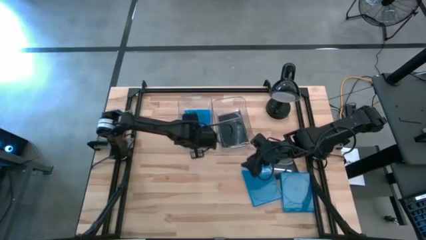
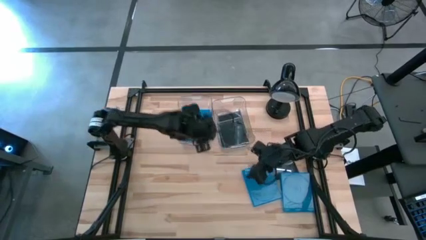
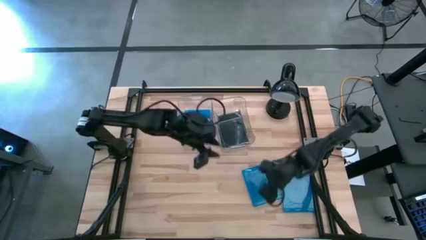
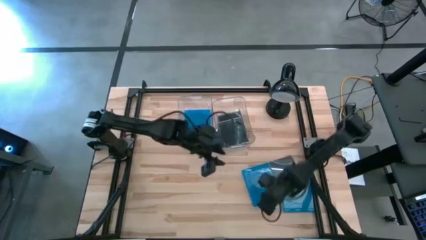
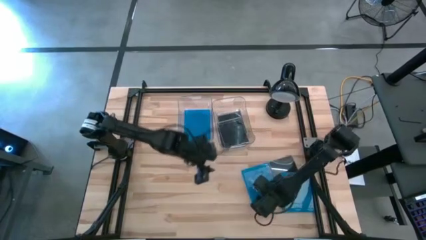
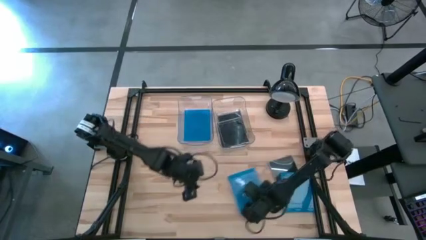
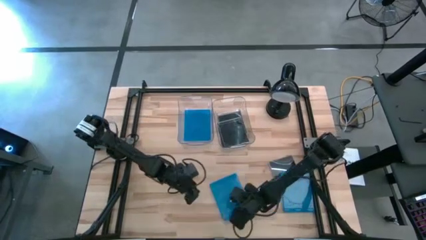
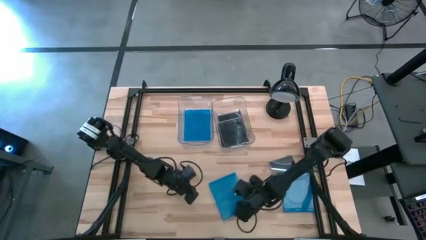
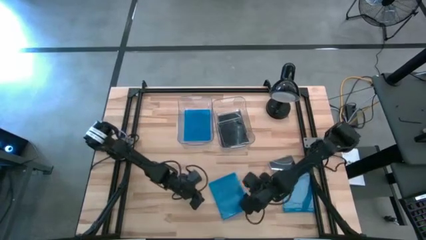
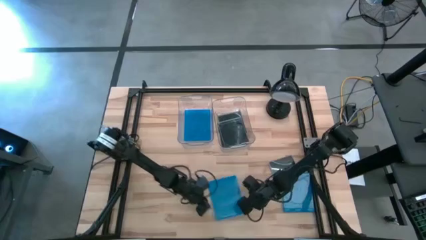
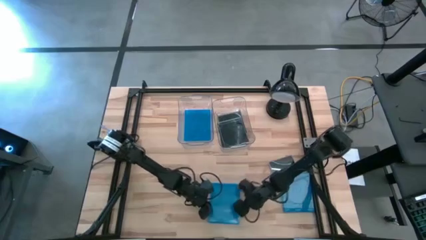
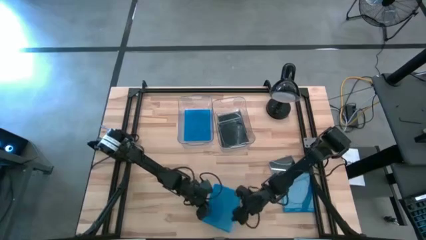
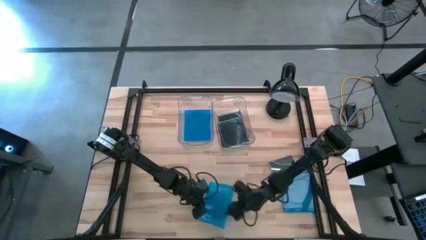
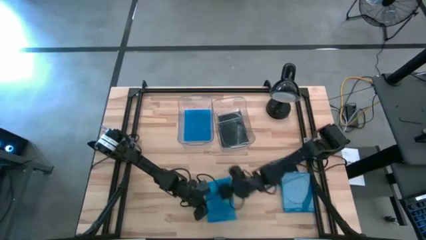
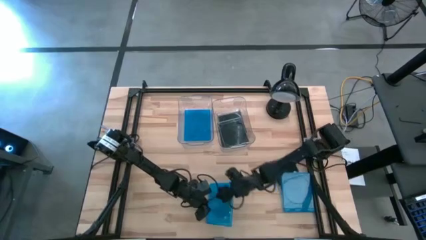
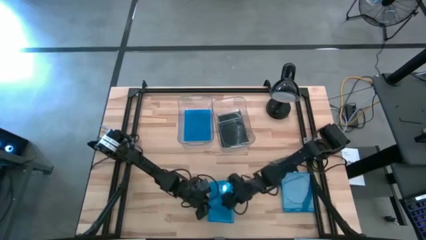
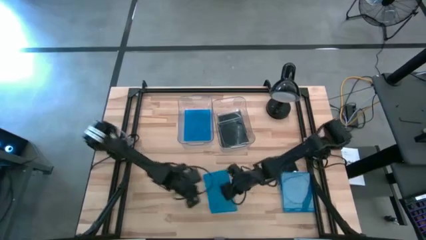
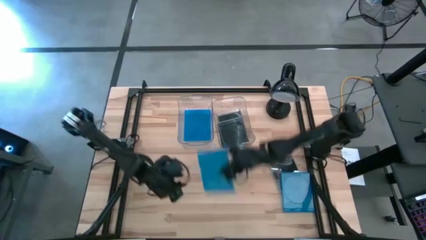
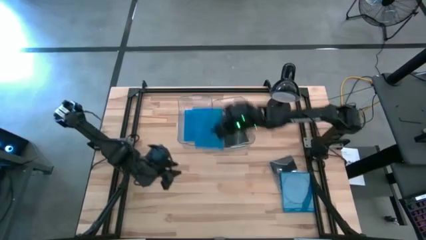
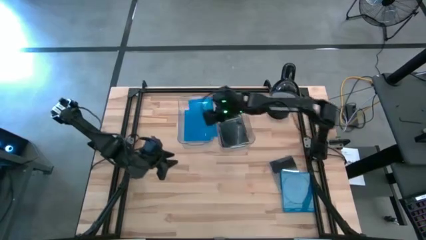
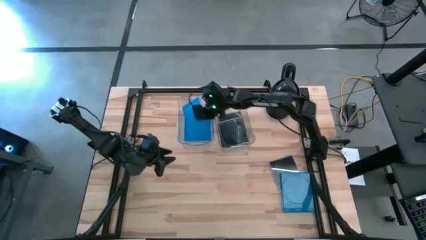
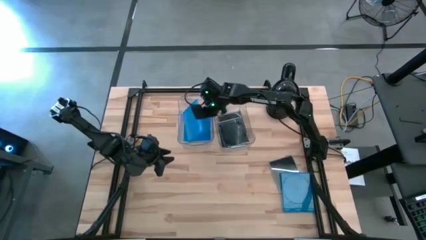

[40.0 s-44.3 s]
Task: Pick & place jewel cases by type
Put the blue CD case into the left transparent bin

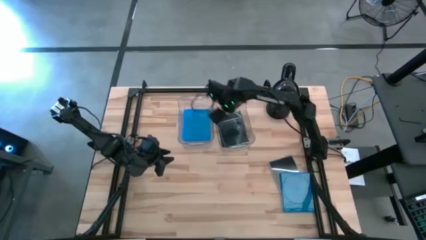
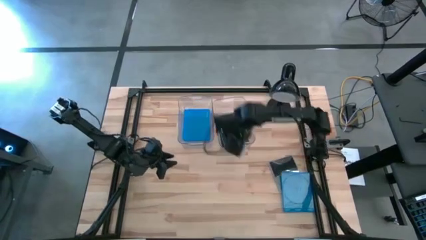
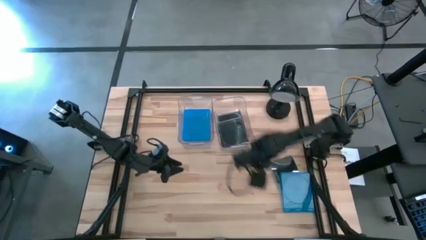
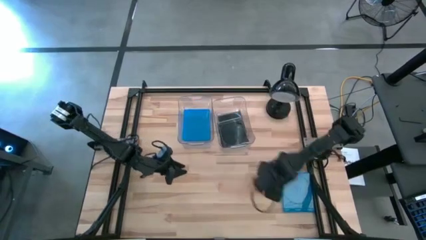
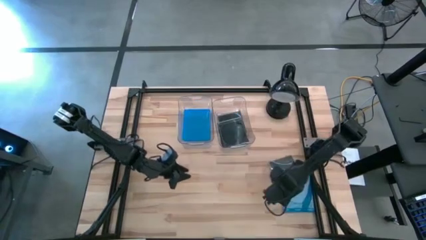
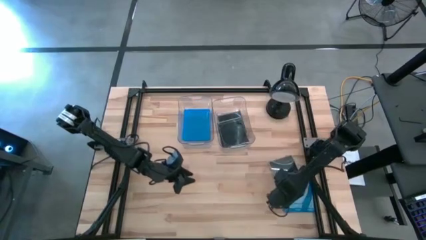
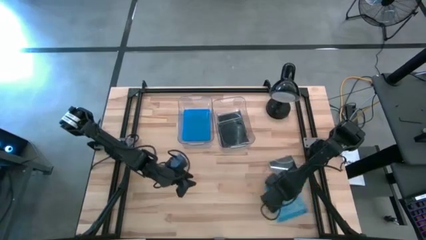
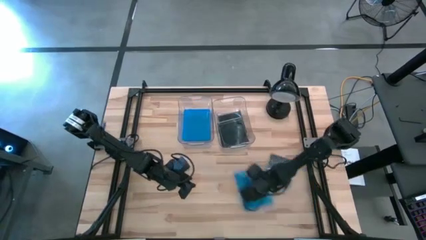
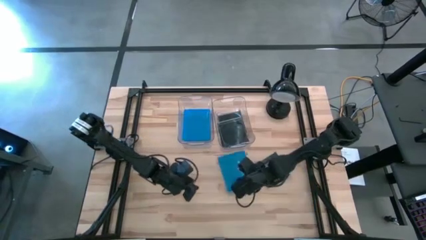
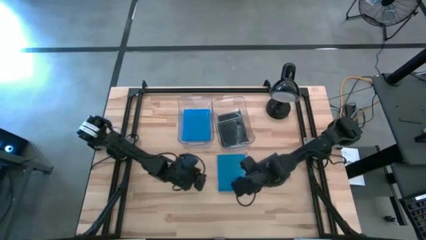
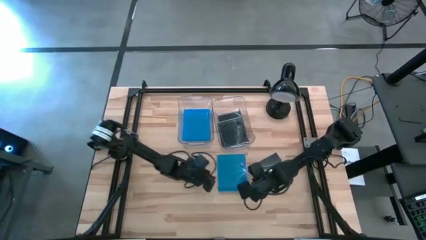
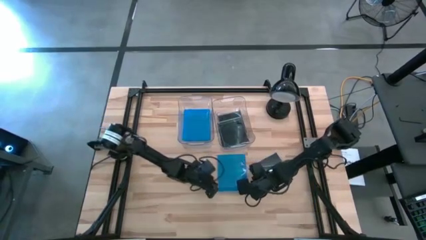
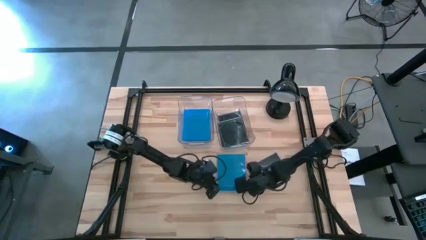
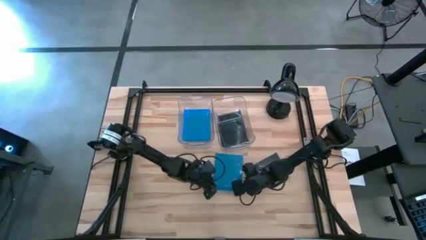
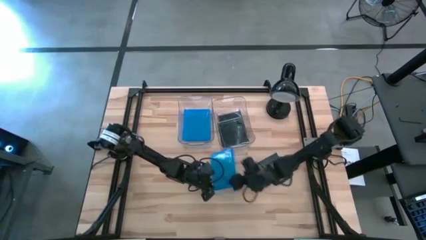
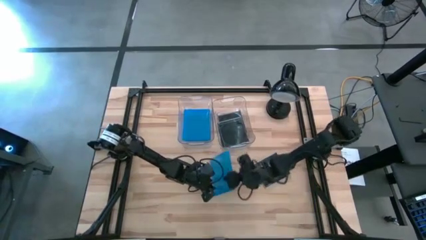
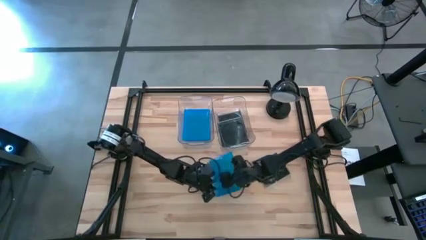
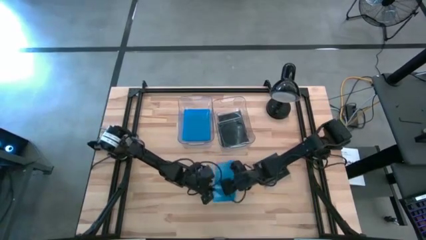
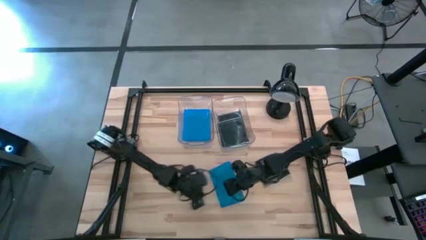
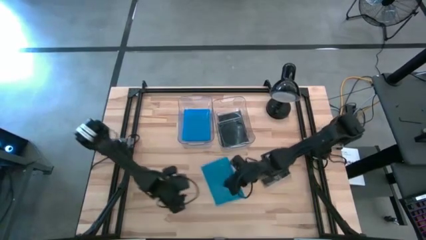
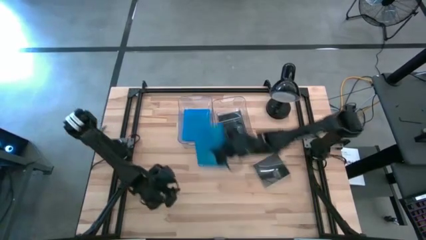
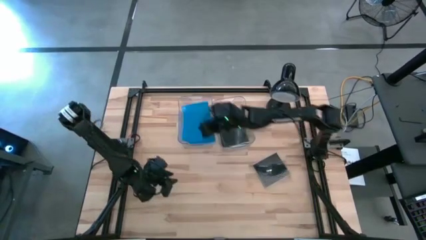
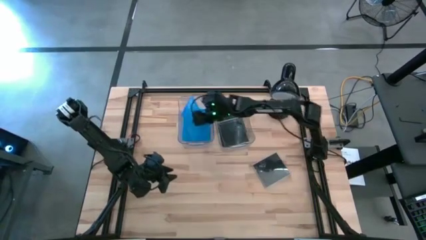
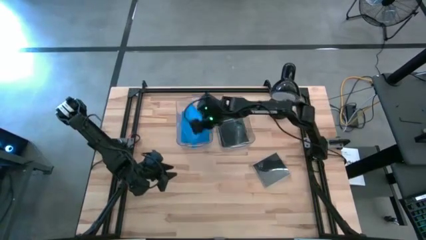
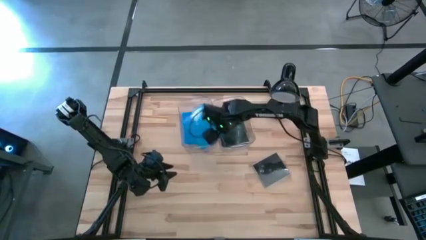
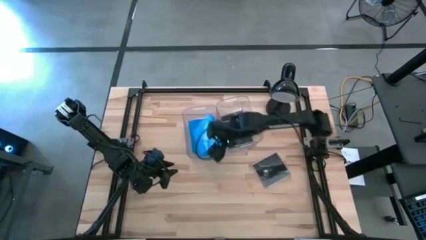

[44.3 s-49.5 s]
Put the blue CD case into the left transparent bin

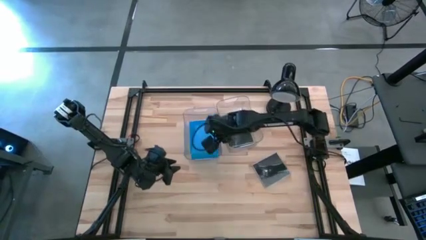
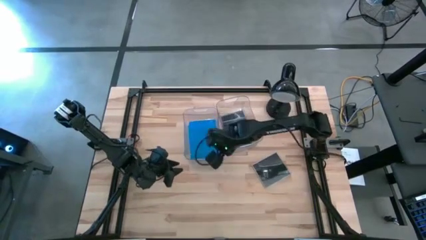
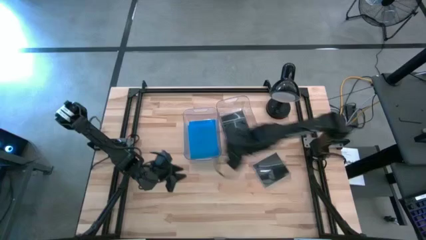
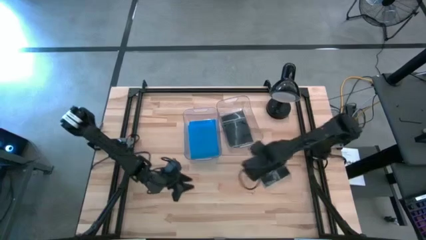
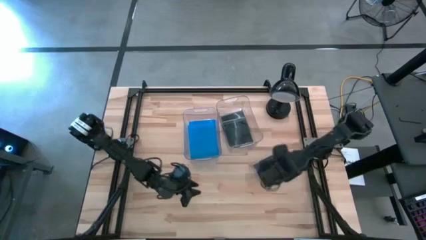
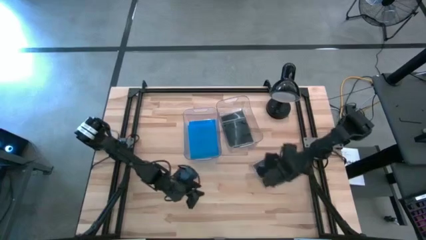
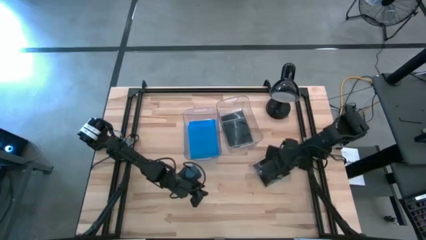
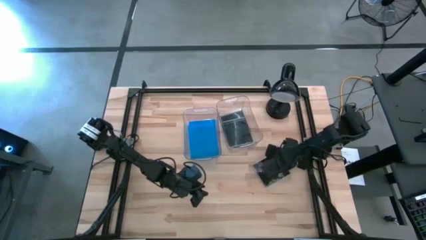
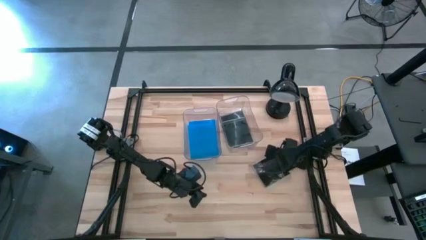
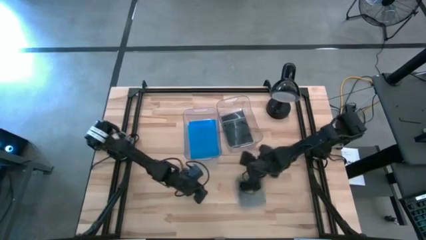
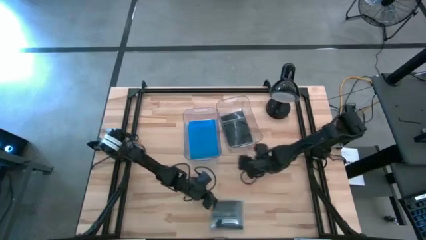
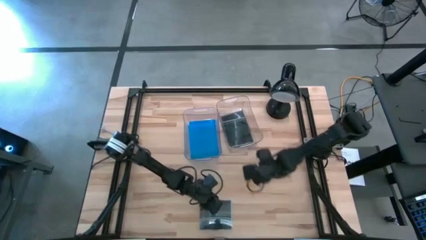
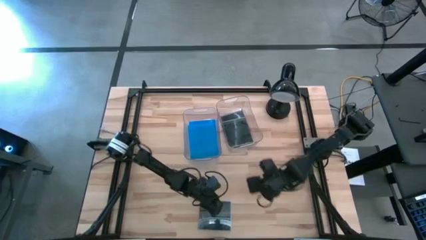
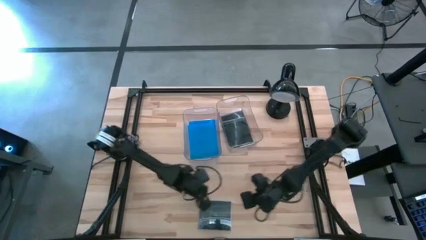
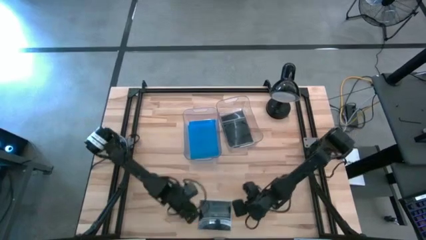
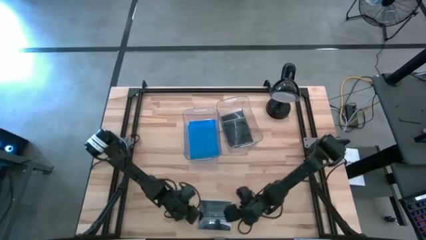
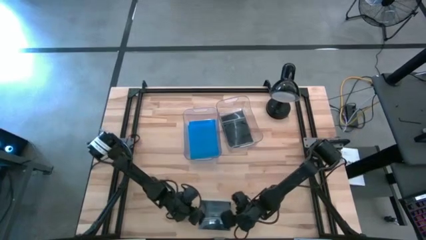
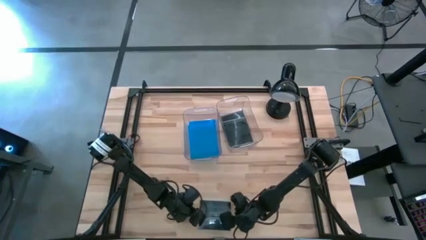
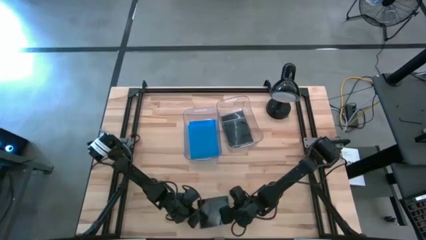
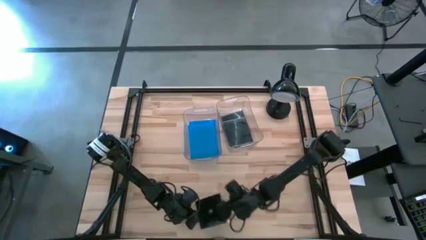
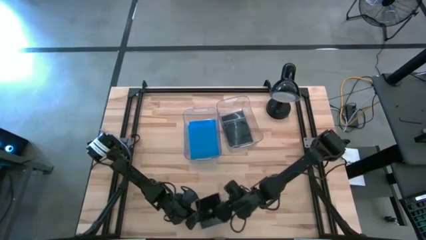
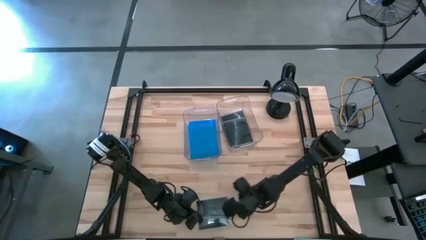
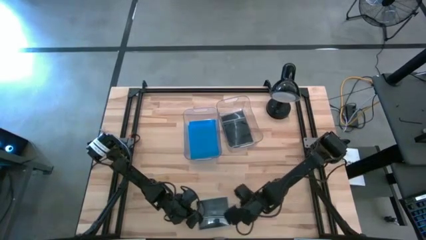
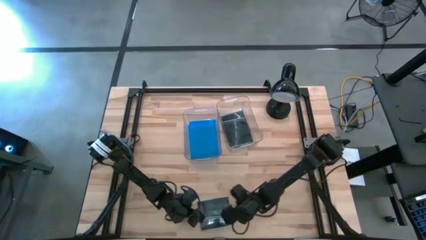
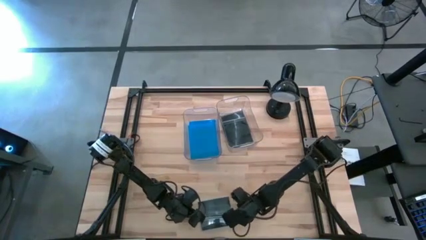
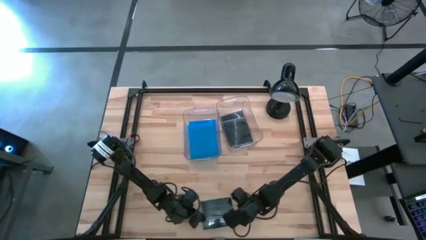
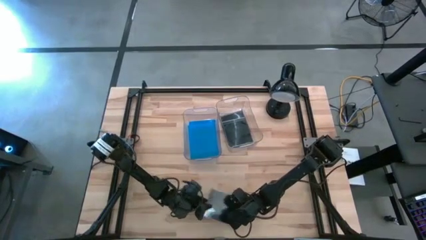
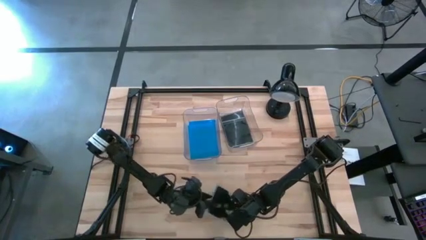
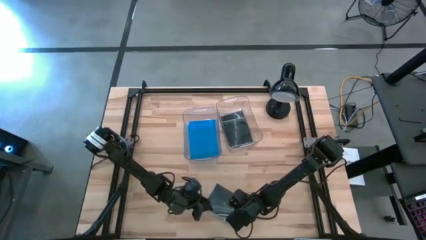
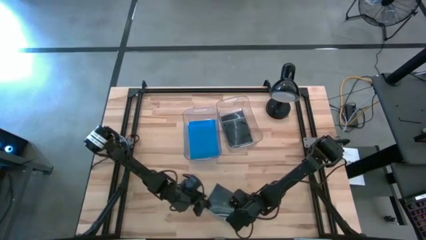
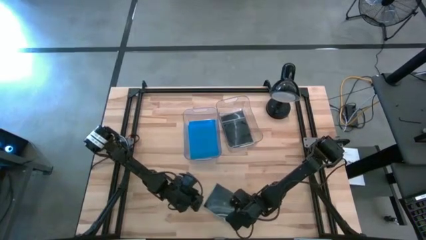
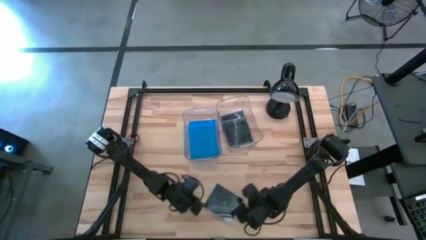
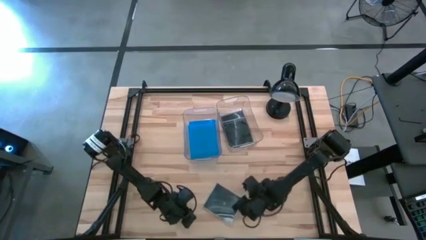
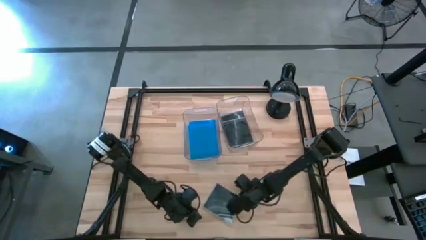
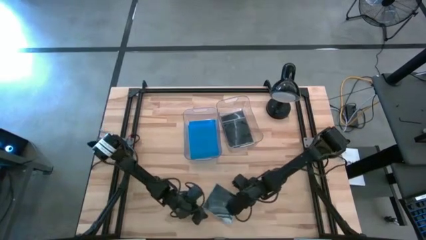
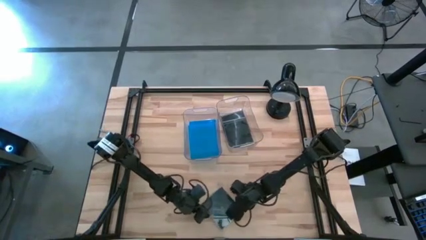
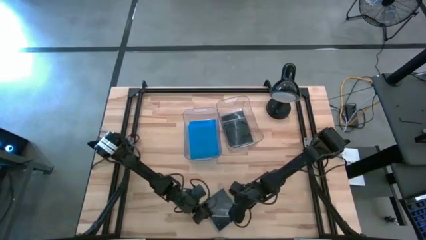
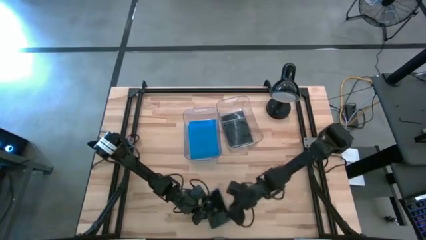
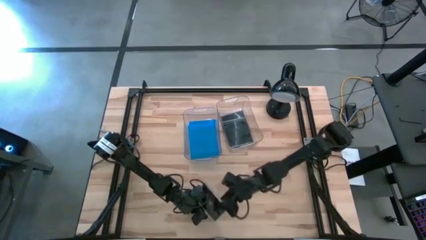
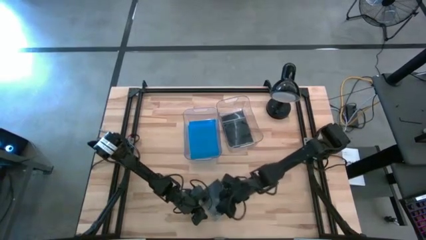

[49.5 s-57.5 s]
Put the black CD case into the right transparent bin
